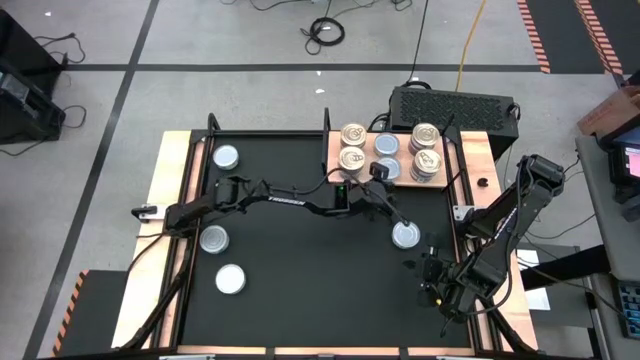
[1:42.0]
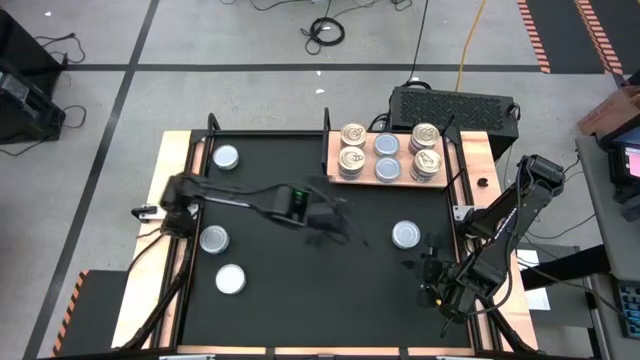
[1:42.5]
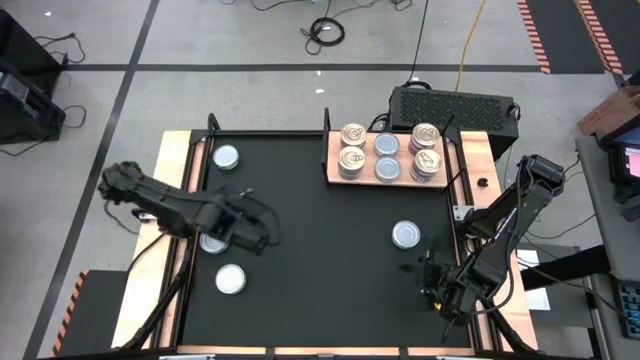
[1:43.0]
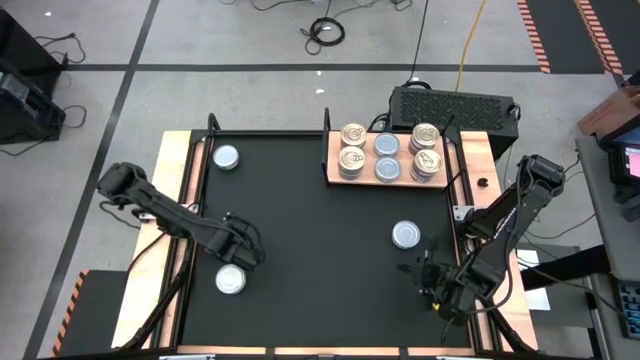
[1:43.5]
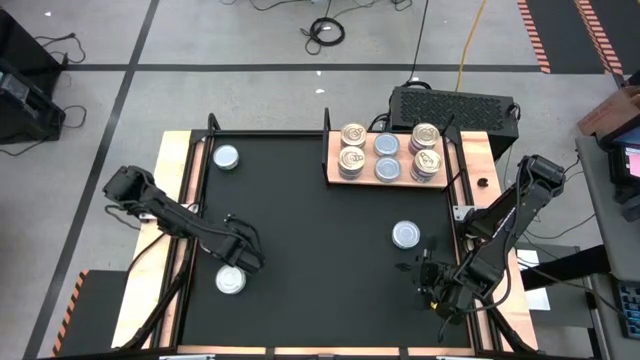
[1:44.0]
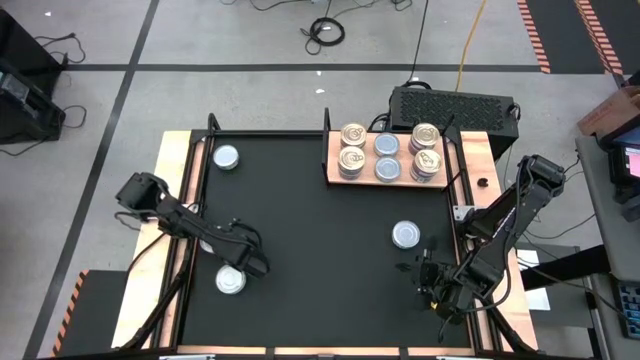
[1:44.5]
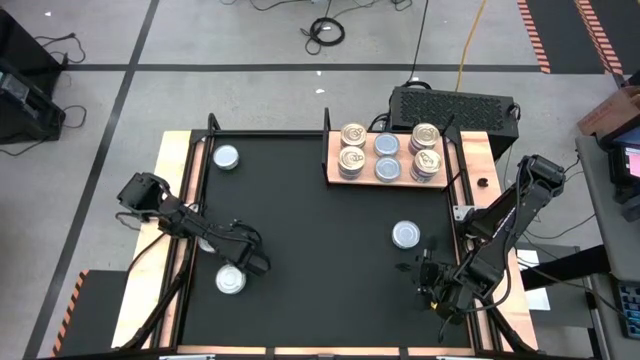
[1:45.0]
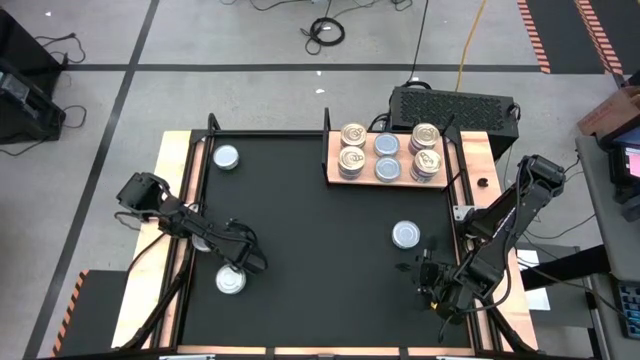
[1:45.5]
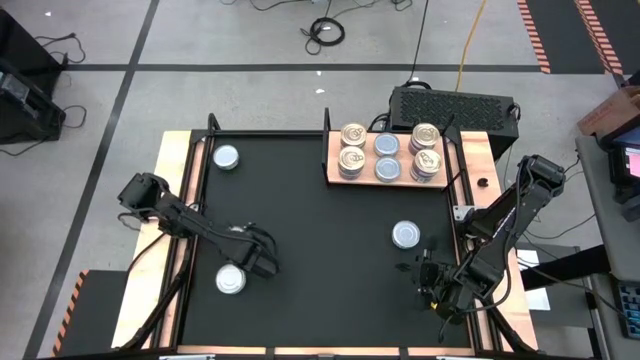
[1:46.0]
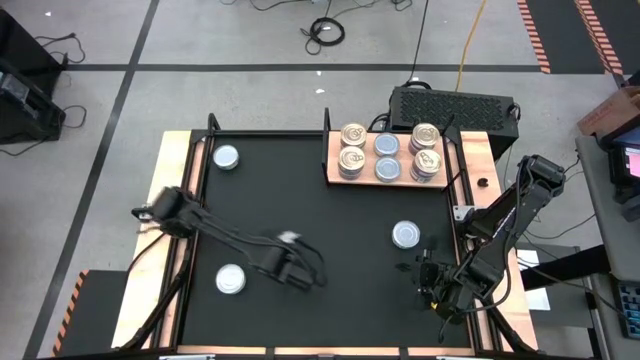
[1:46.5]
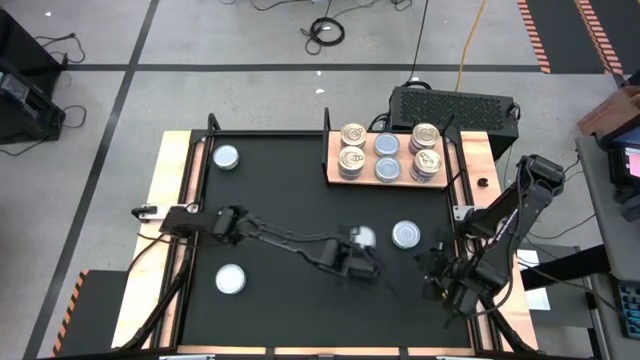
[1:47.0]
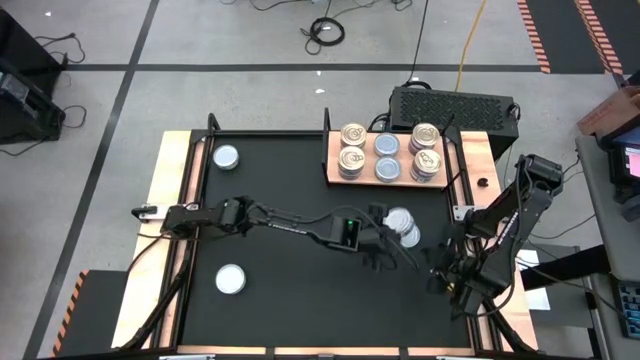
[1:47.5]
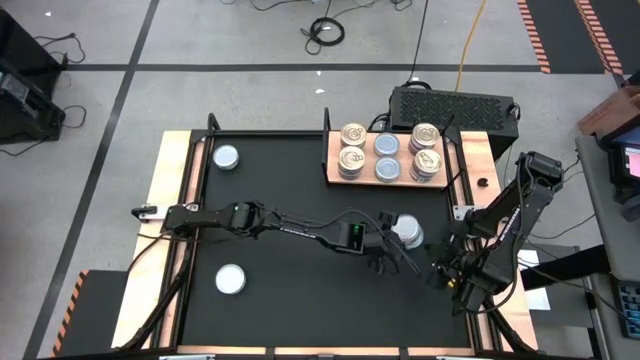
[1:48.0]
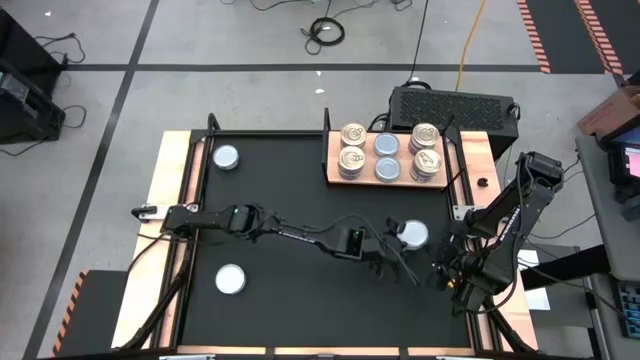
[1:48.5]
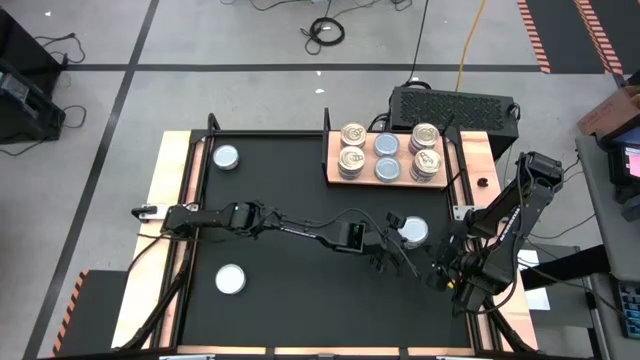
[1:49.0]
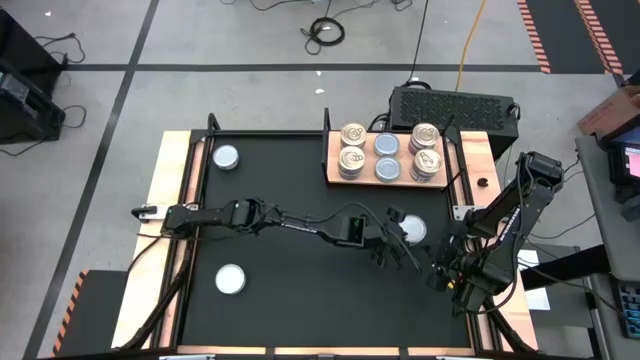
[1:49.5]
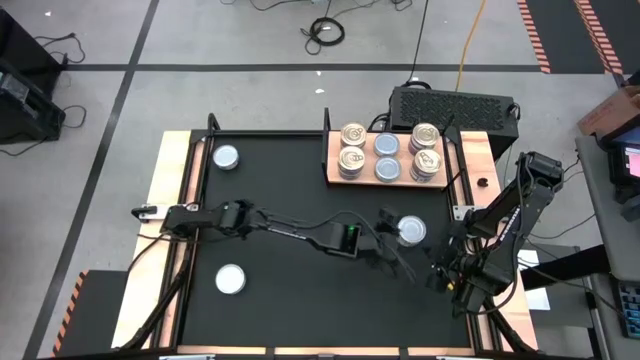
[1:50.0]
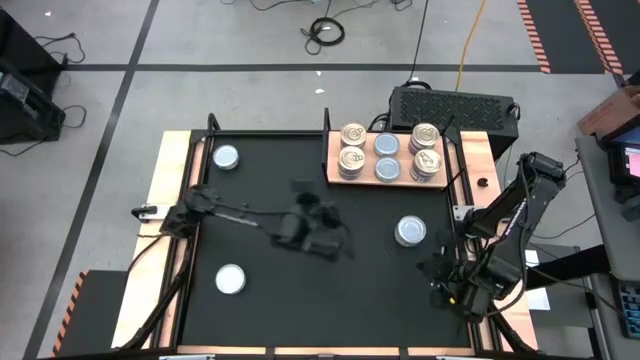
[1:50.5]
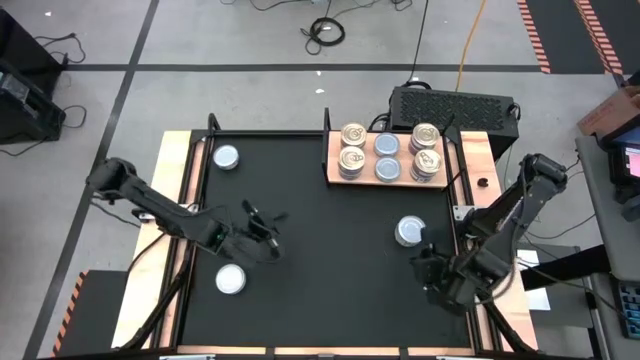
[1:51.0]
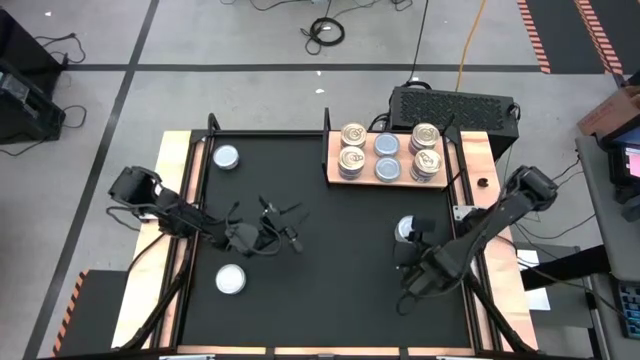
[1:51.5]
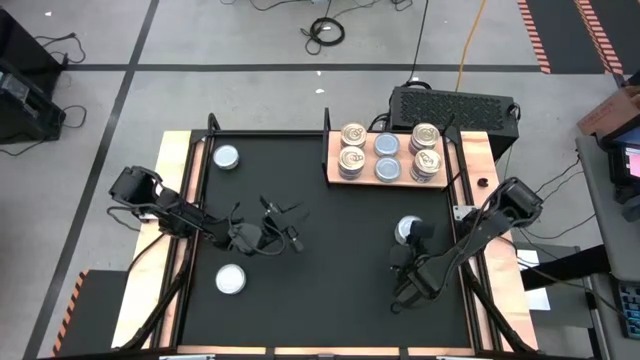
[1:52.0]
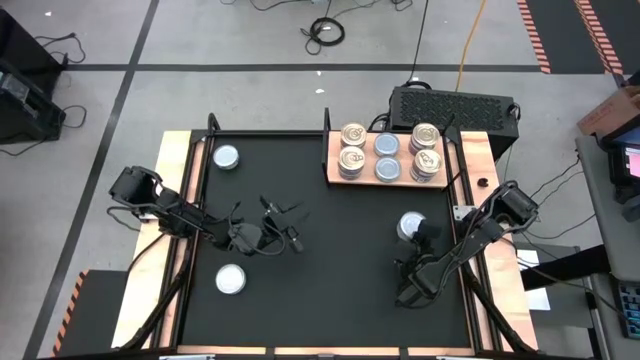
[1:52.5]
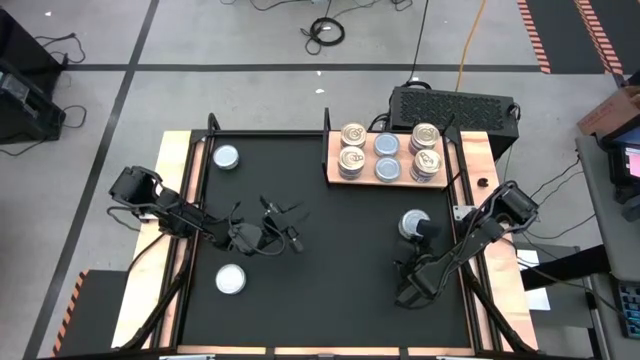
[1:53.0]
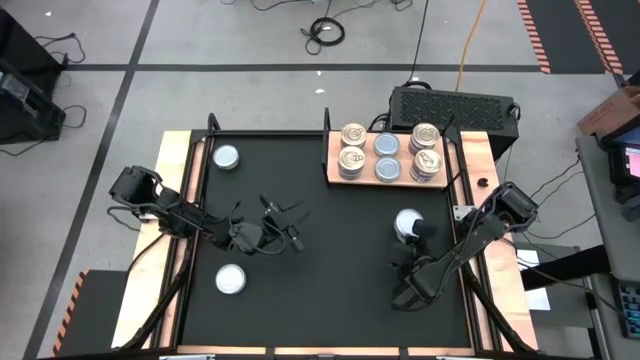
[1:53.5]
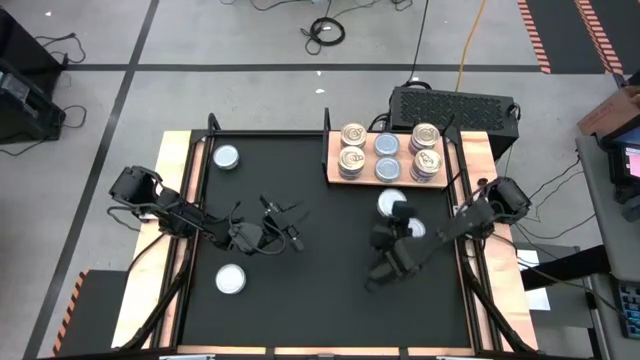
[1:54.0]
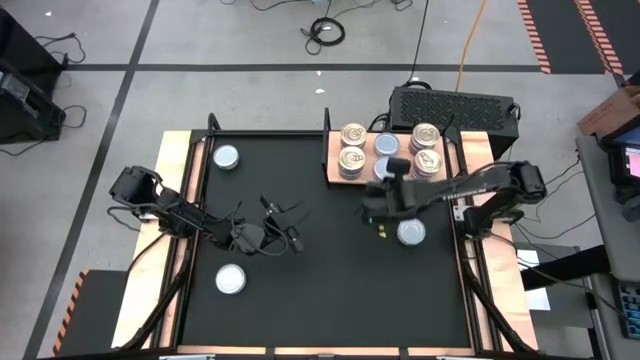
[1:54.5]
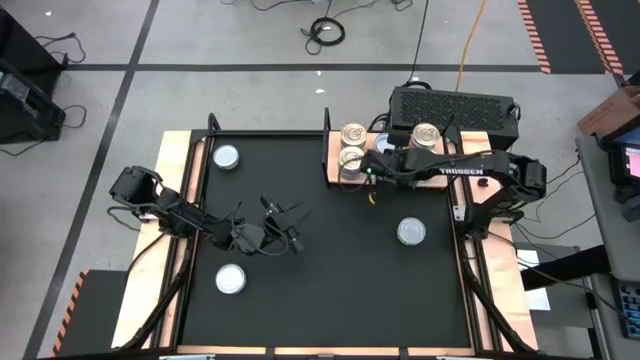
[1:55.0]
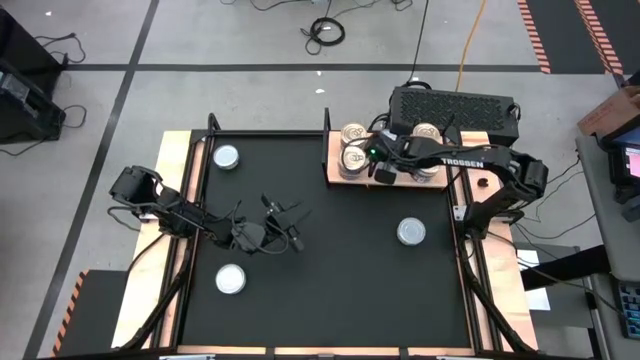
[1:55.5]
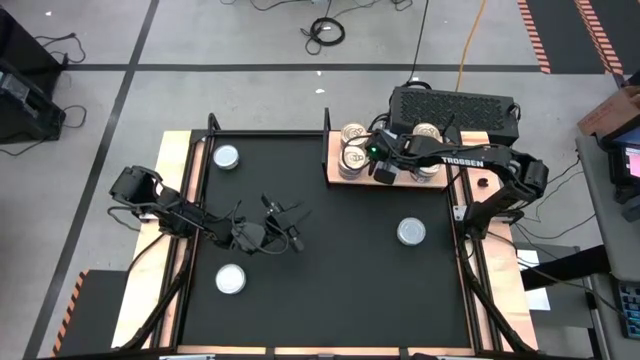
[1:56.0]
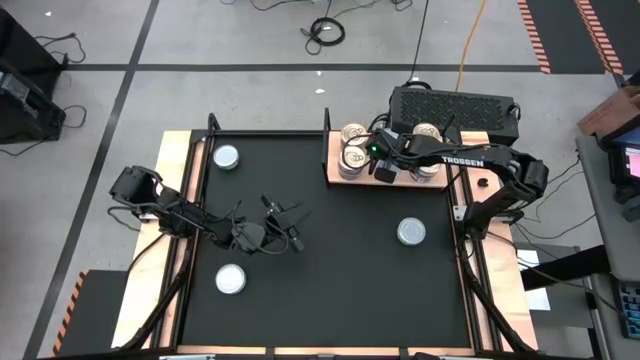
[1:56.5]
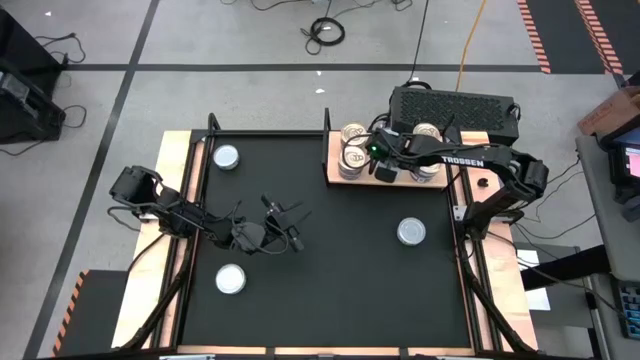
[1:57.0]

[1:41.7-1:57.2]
Task: Stack canned seafood by type on shelf
Stack the green tuna can on top of the top green tuna can on the shelf

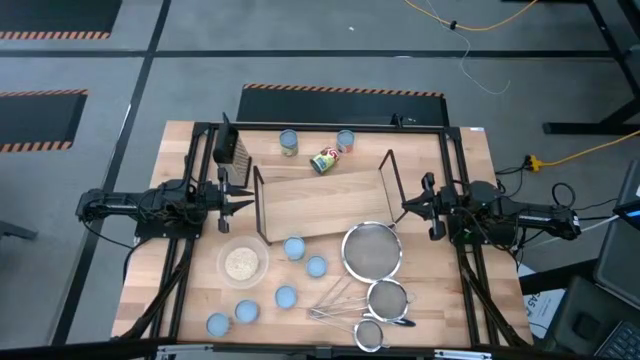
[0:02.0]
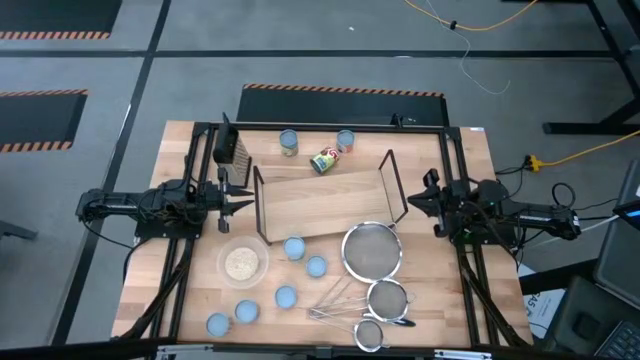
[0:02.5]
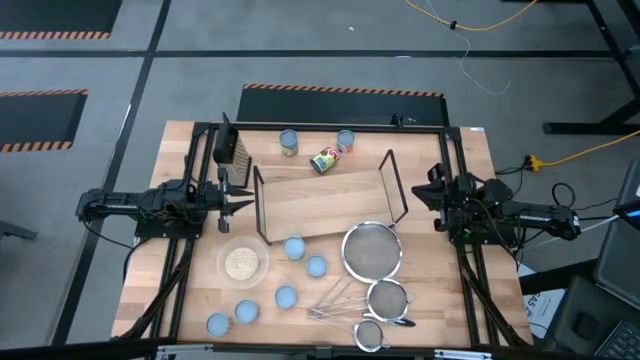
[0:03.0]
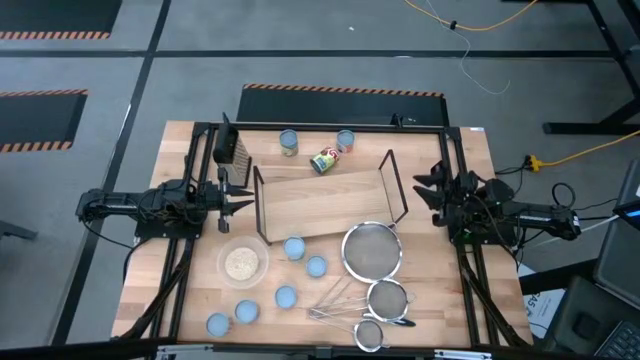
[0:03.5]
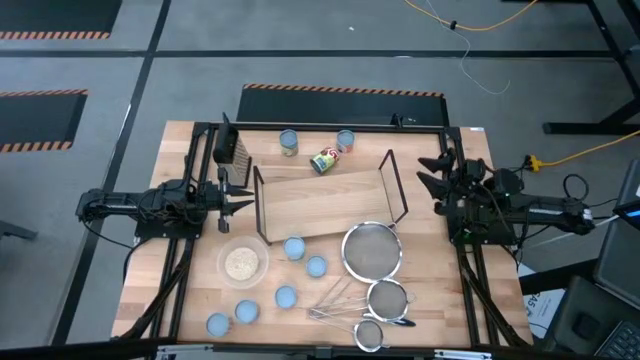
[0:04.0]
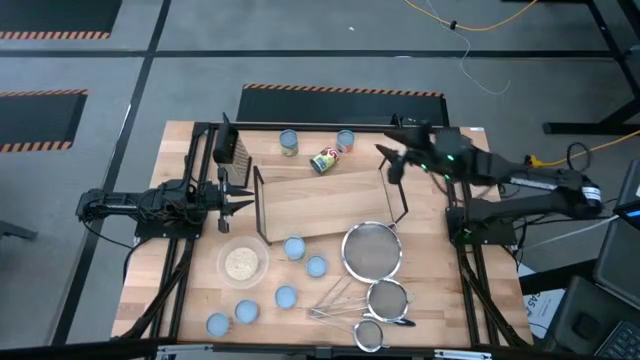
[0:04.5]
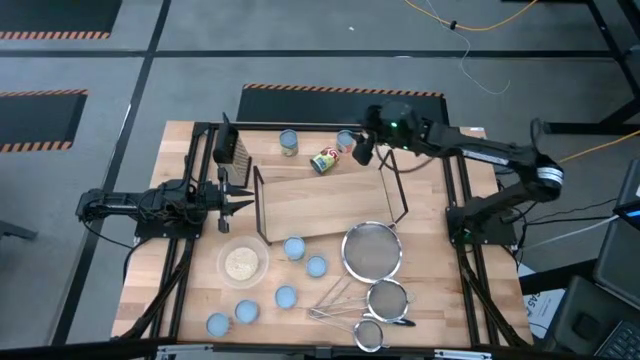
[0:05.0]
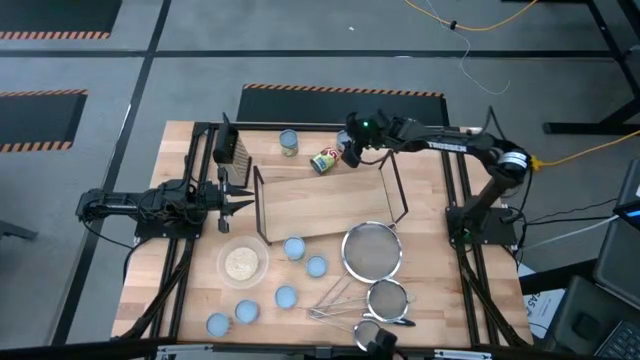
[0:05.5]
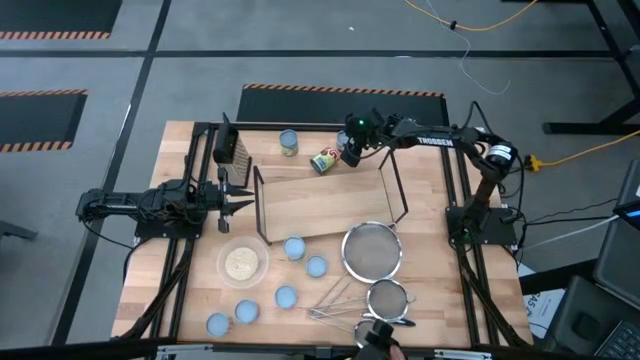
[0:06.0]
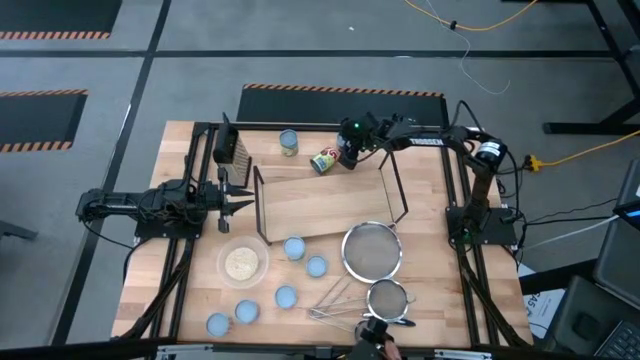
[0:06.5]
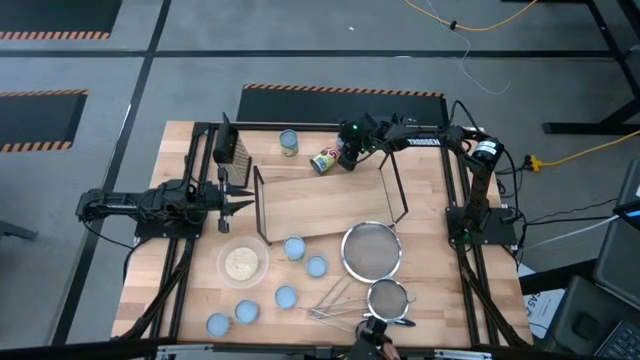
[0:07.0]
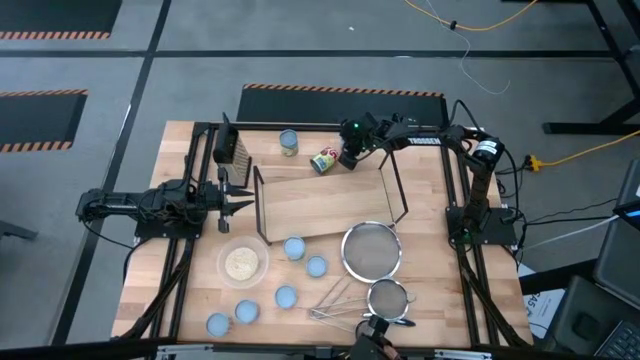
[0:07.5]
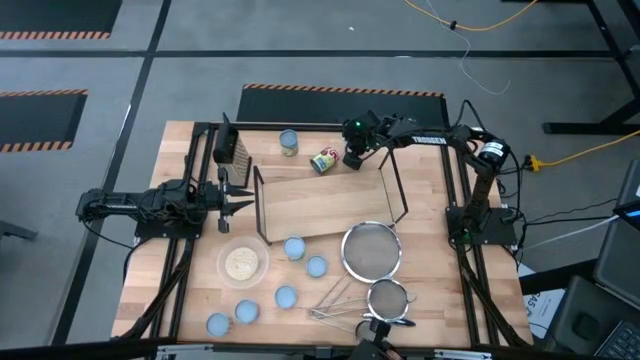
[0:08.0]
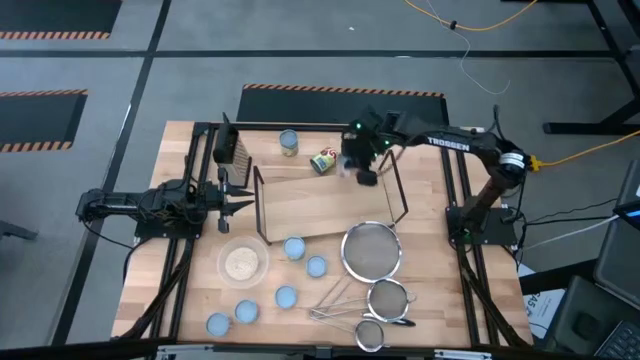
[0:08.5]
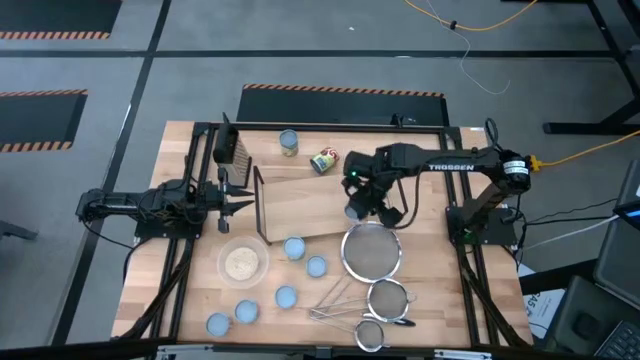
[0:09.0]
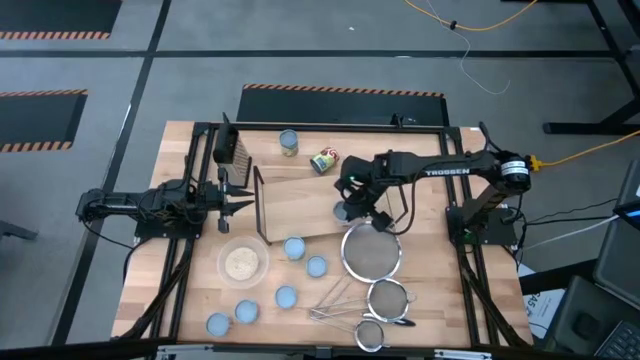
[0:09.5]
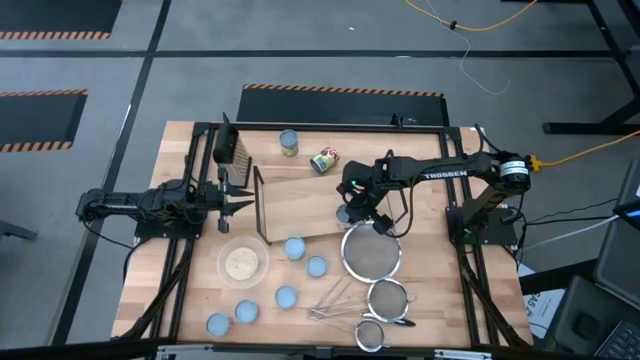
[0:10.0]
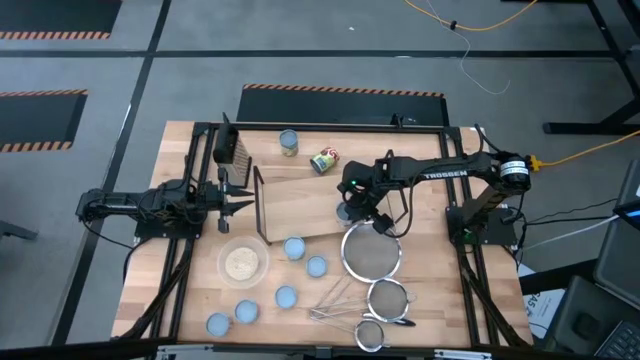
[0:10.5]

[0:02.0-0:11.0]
Task: Pick and place cans onto a shelf
Put the large orange can on the shelf
